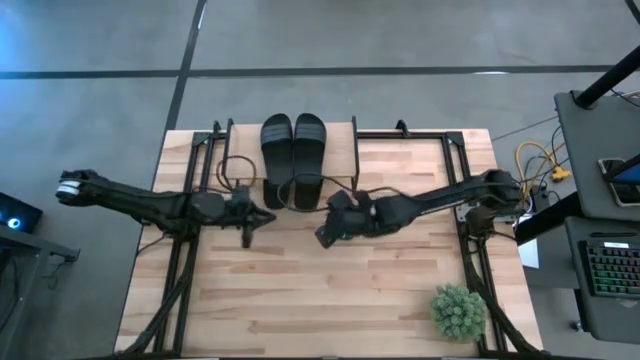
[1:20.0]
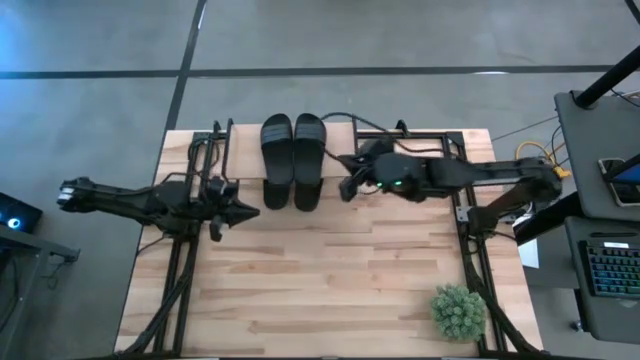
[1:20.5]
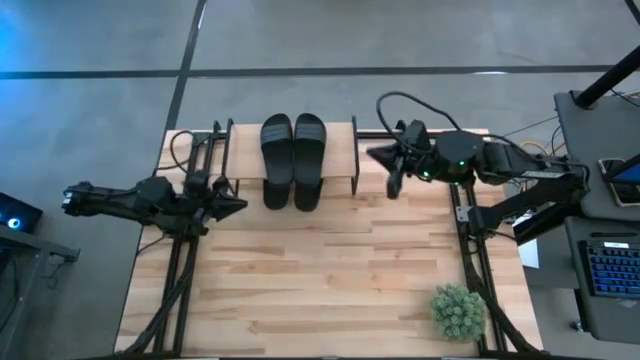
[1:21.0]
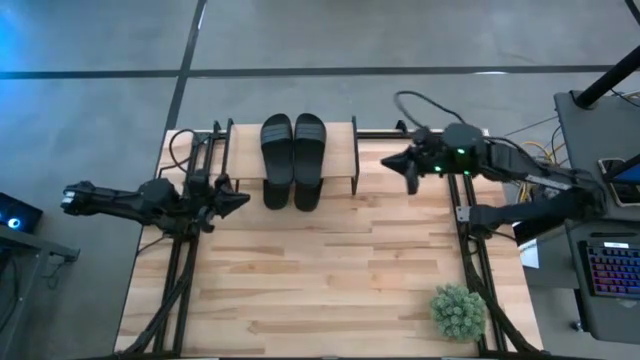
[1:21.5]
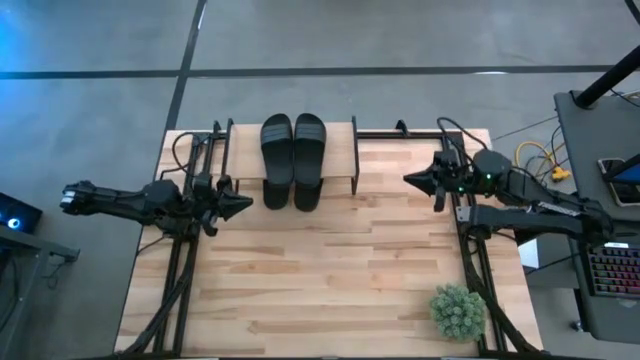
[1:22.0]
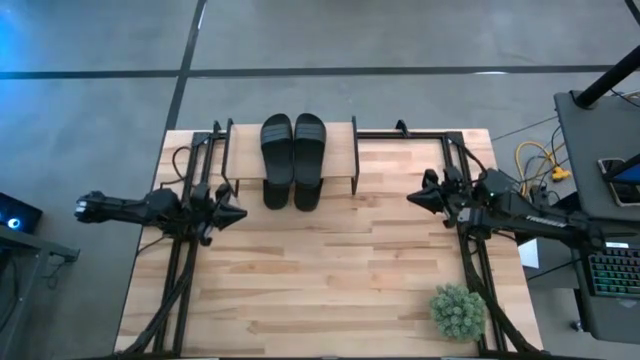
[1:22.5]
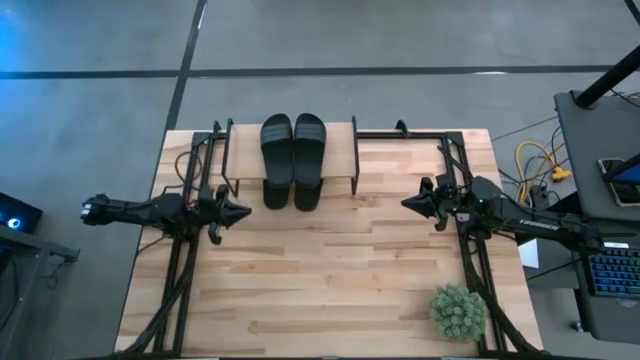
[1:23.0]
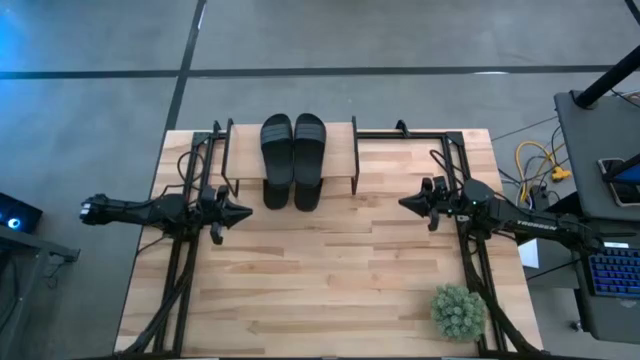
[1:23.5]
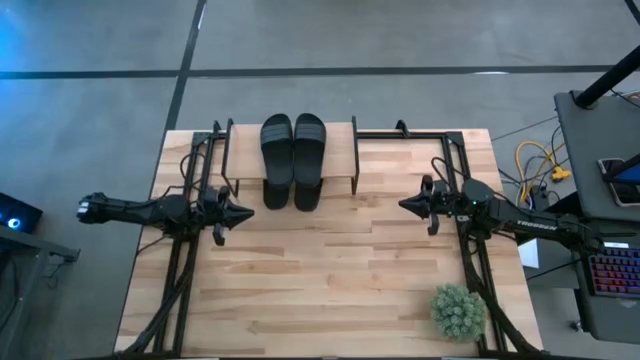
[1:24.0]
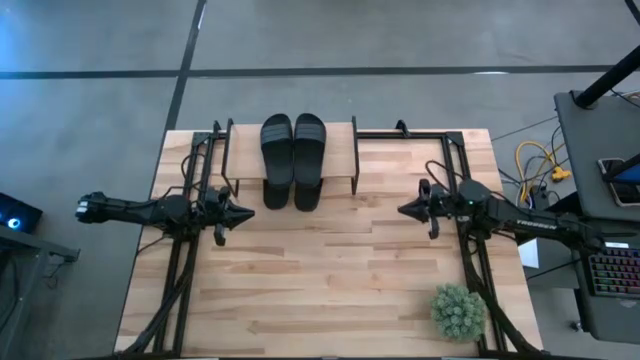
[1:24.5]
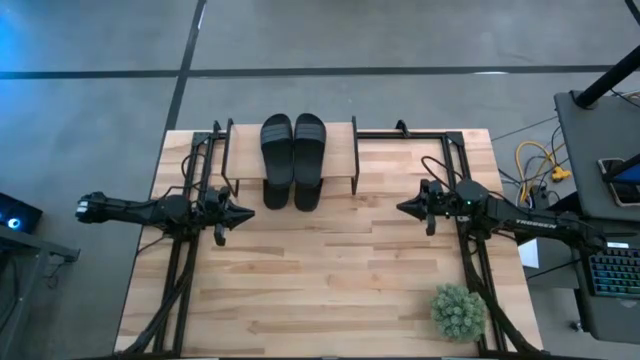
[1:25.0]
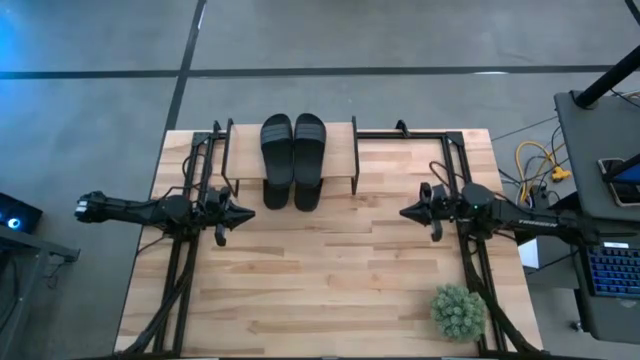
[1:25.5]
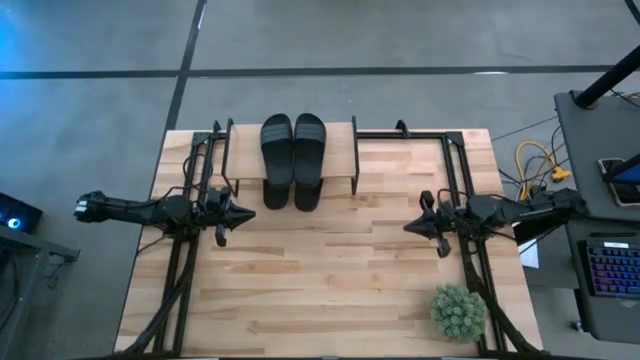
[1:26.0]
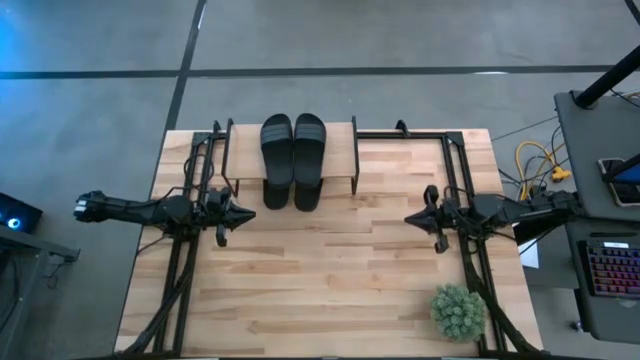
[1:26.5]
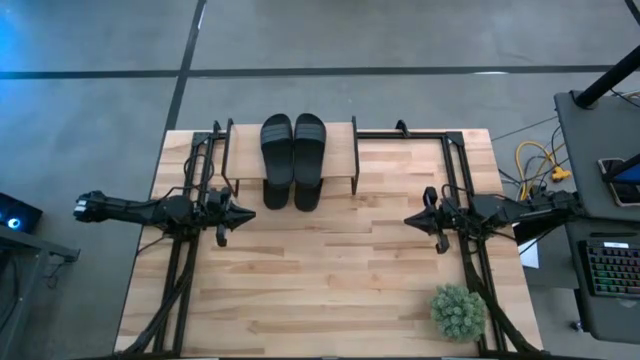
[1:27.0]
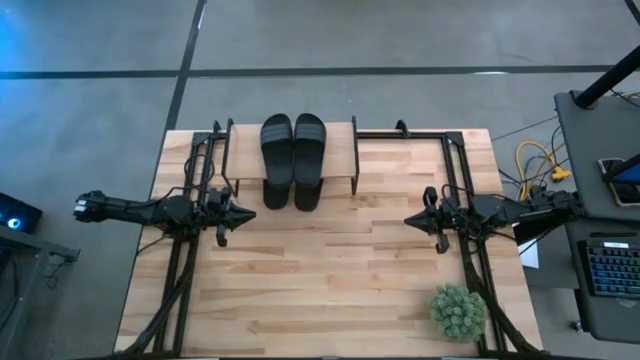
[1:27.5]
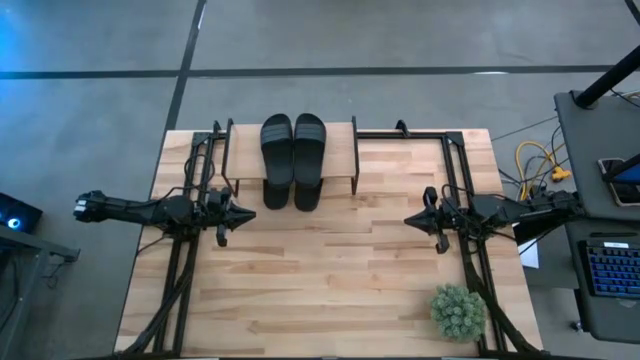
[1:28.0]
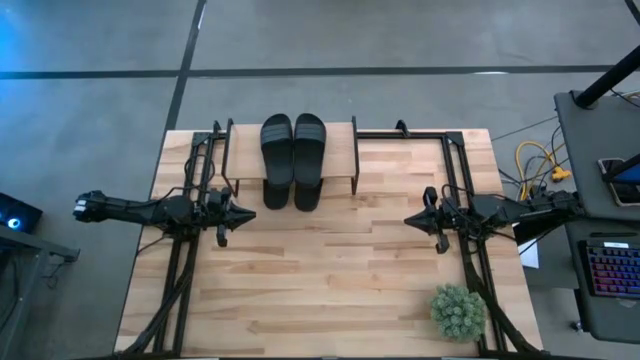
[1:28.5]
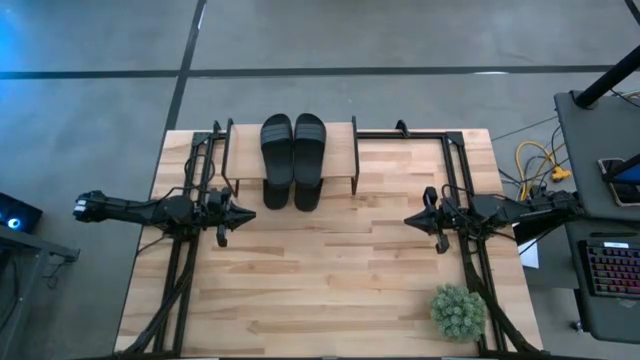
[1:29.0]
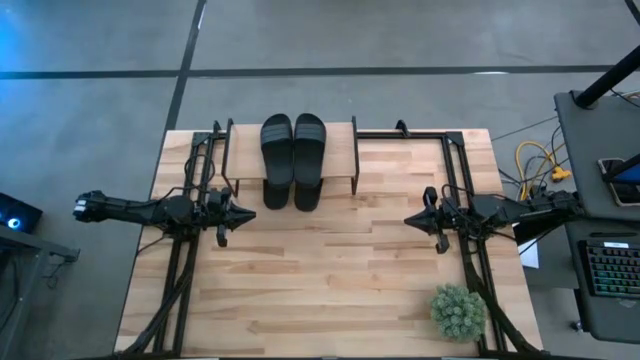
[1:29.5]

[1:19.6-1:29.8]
Task: Pick and place slides into the shelf
Return to Home Position

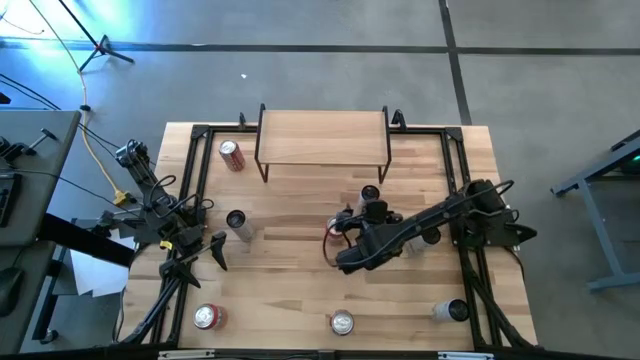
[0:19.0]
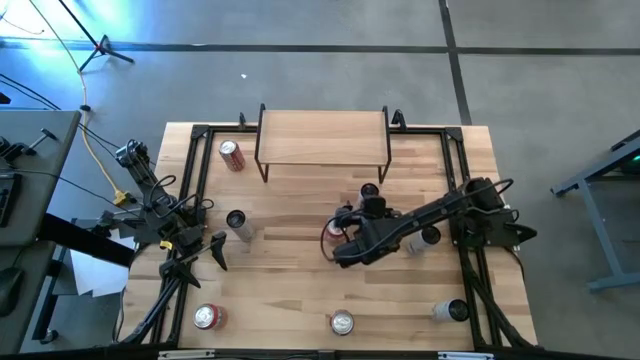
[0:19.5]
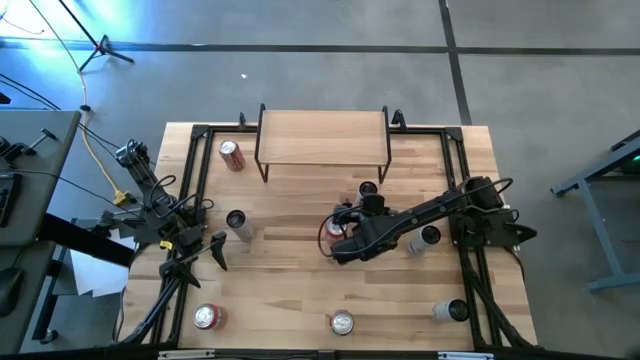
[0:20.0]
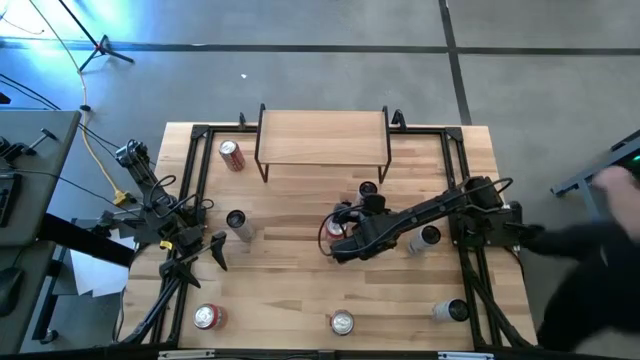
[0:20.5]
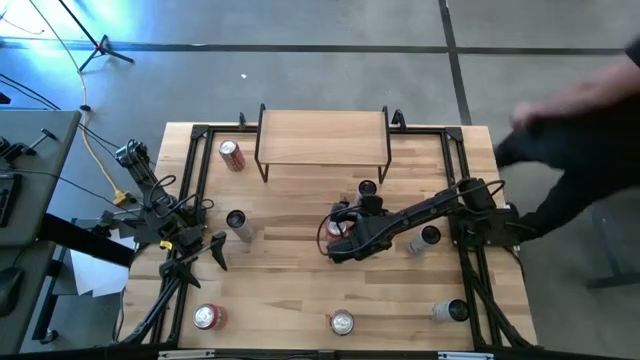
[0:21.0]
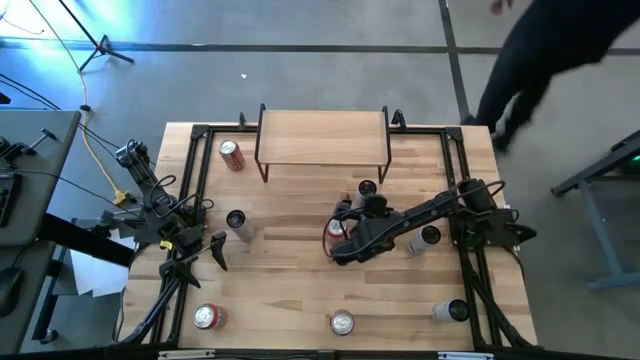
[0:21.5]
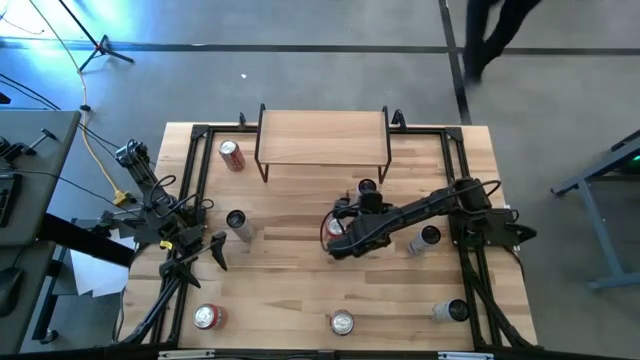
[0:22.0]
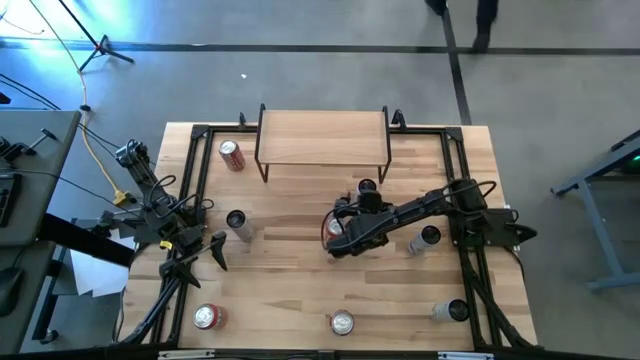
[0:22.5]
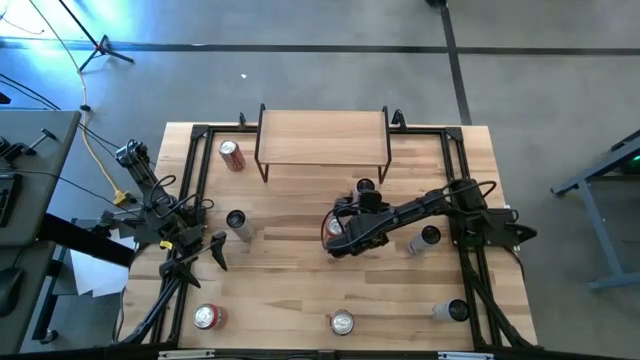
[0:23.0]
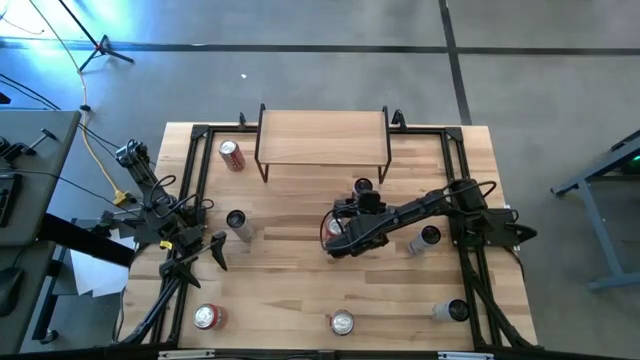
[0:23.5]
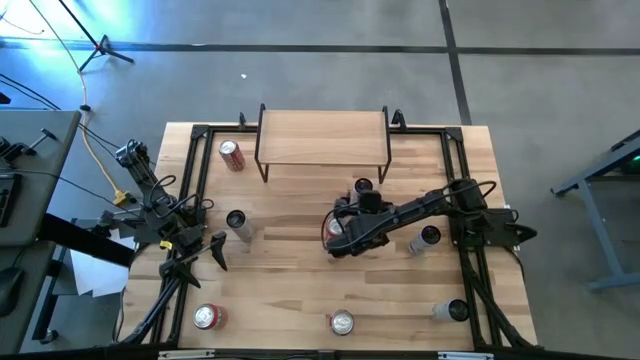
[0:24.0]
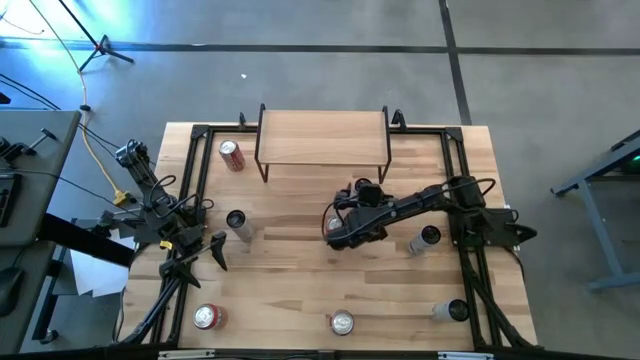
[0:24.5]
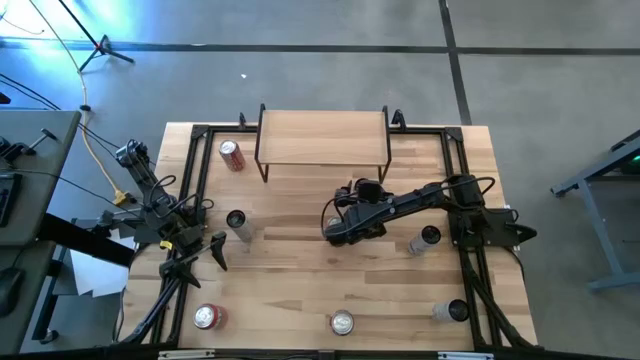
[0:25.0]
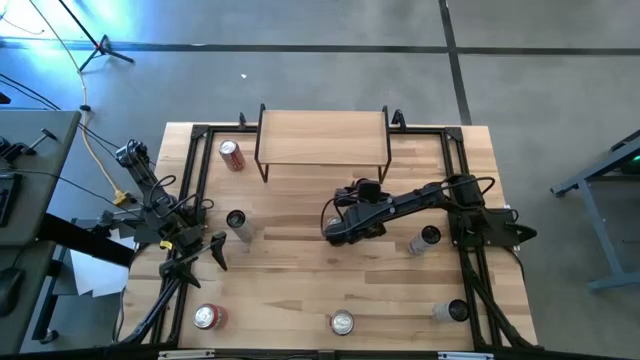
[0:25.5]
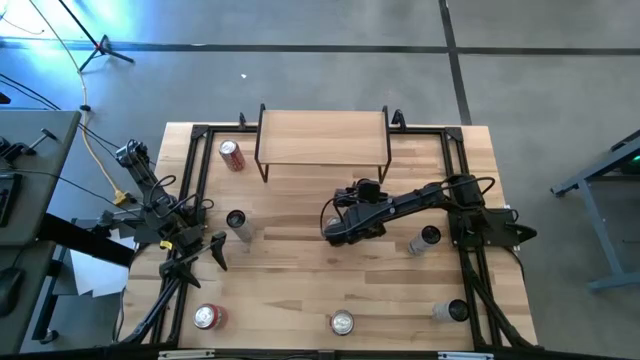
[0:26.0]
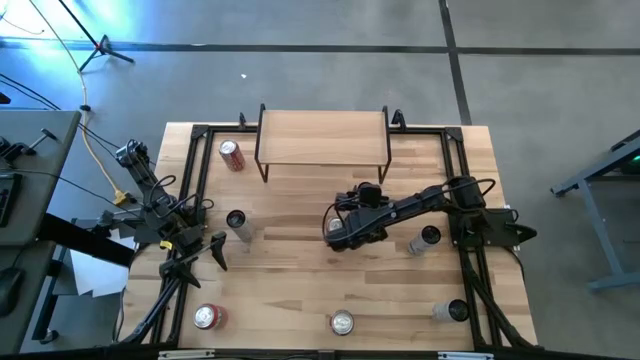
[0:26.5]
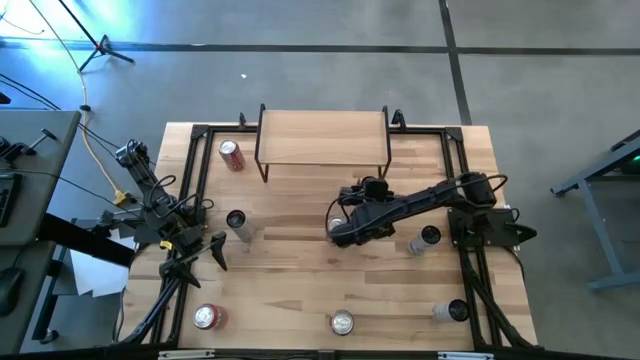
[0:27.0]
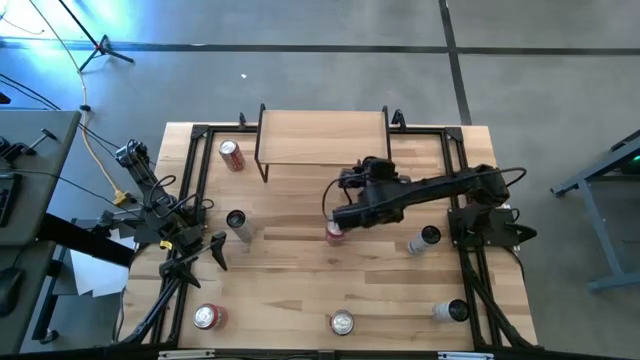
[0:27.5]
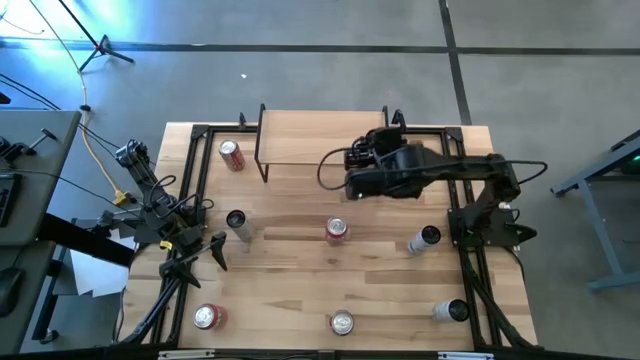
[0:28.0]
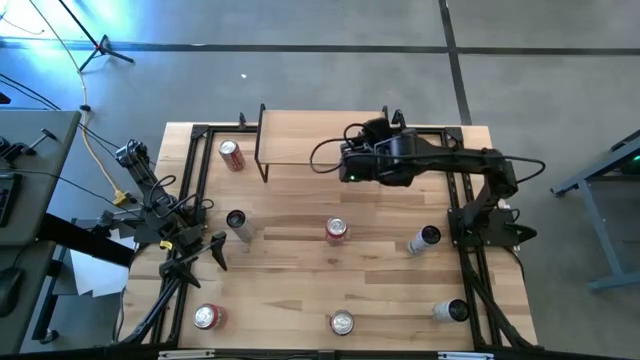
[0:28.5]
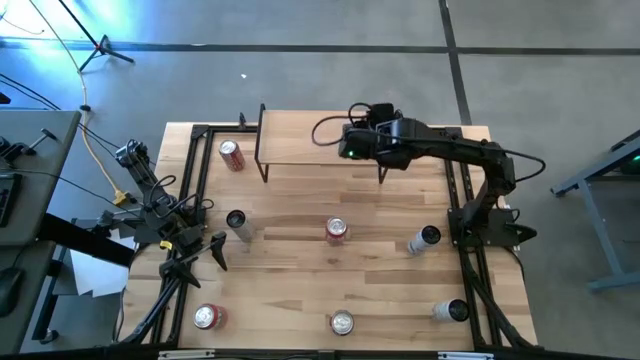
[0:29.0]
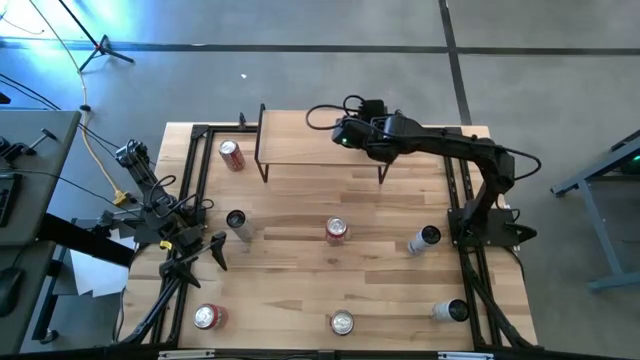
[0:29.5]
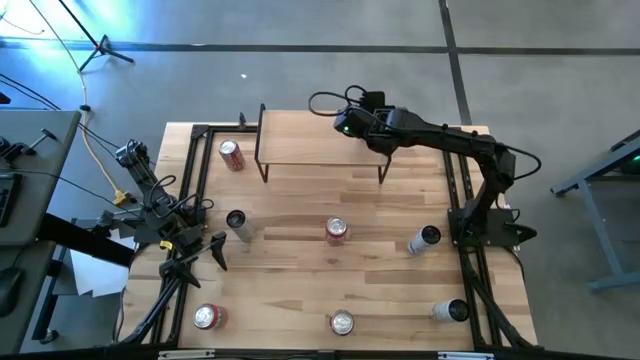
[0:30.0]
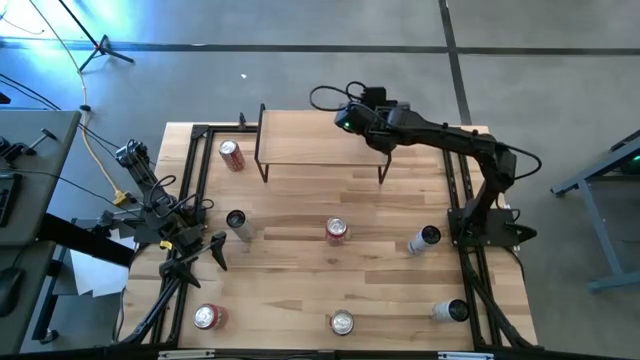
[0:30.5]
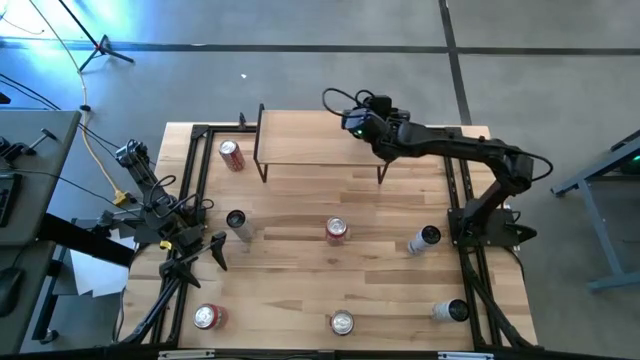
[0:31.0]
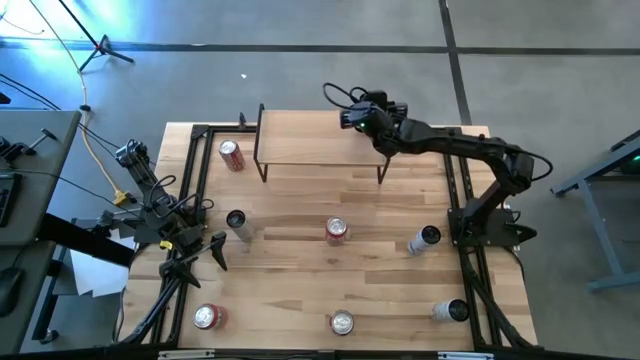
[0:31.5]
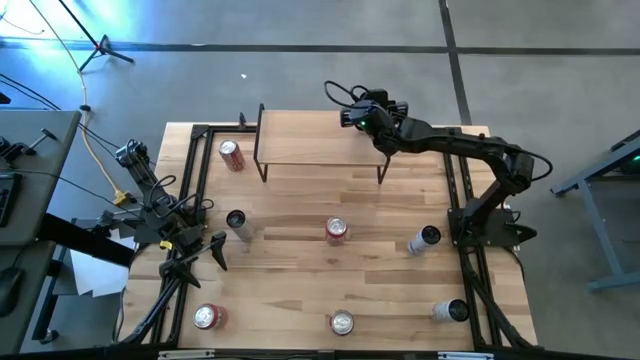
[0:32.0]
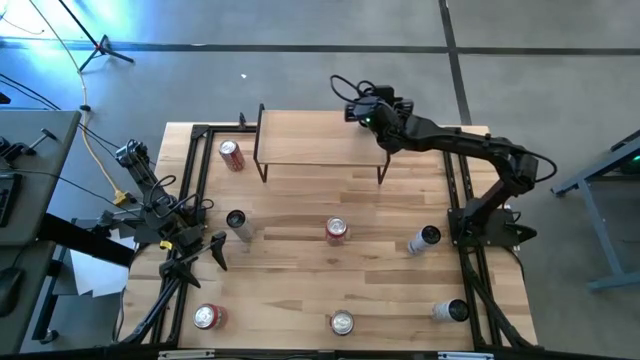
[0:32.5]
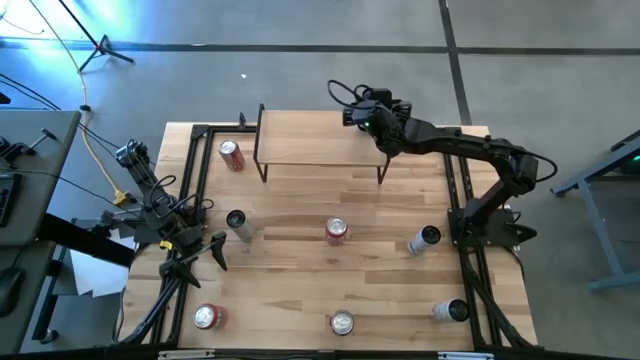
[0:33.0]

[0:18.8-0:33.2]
Task: Place canned beverage on shelf
Put the top white blue soda can on the shelf
